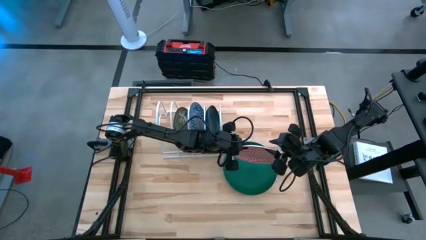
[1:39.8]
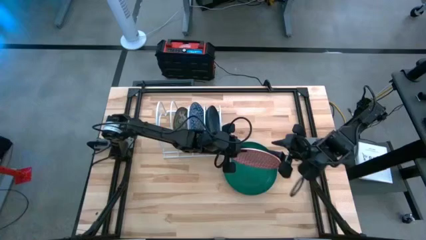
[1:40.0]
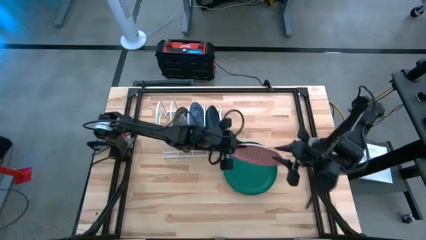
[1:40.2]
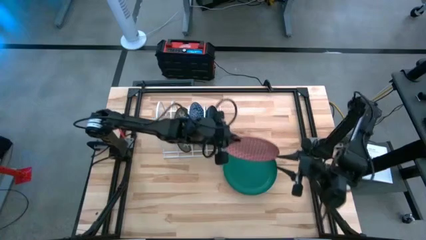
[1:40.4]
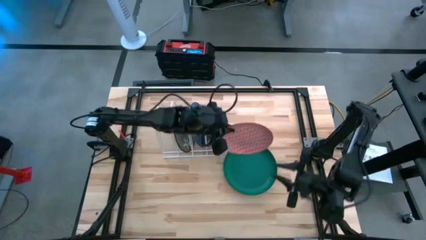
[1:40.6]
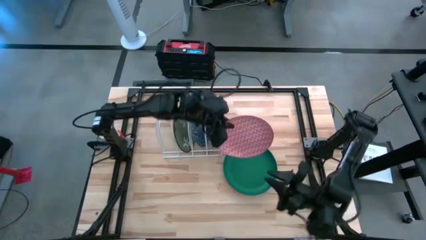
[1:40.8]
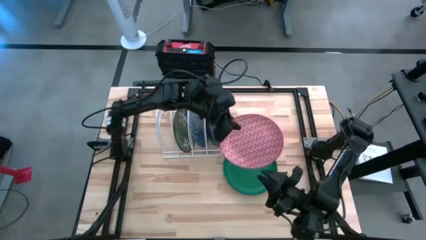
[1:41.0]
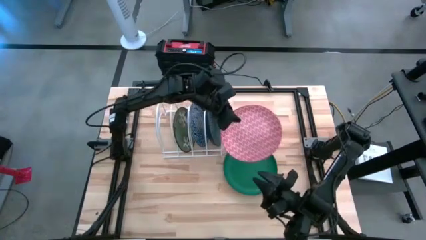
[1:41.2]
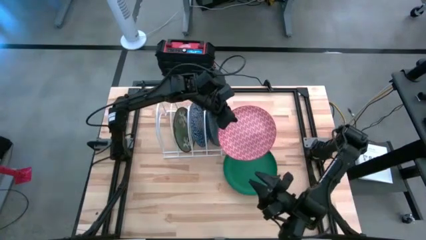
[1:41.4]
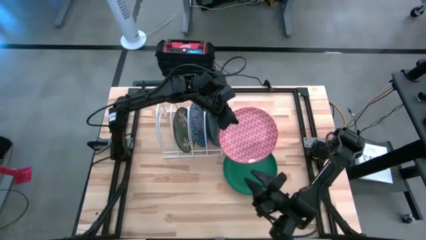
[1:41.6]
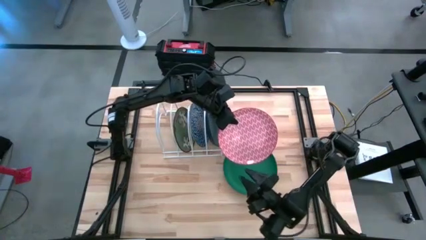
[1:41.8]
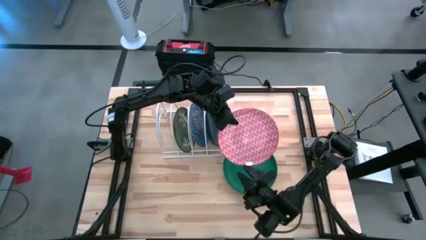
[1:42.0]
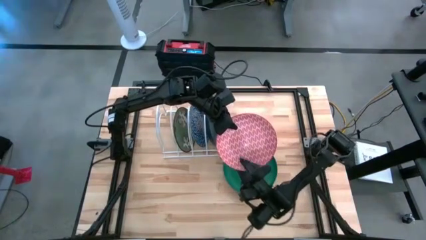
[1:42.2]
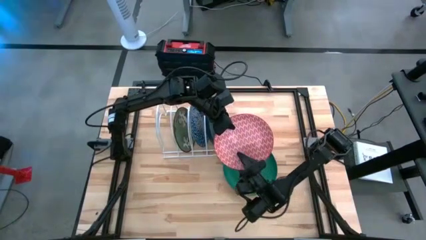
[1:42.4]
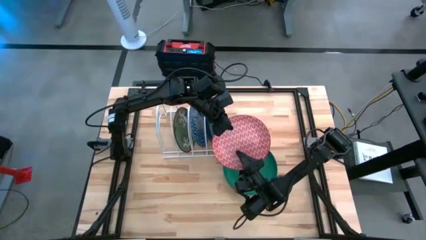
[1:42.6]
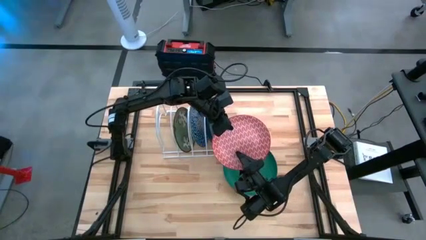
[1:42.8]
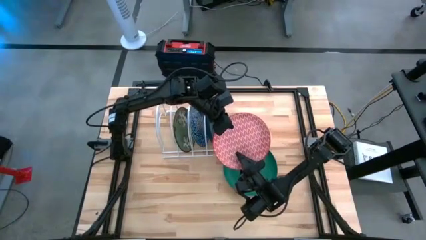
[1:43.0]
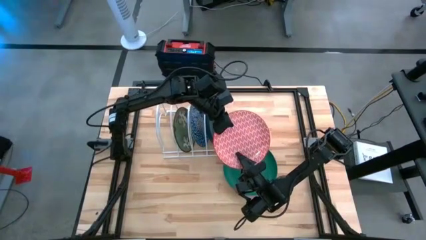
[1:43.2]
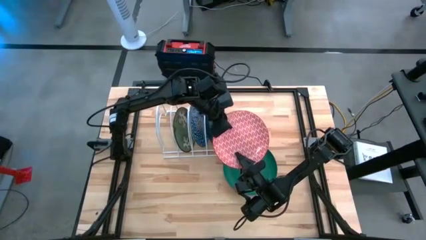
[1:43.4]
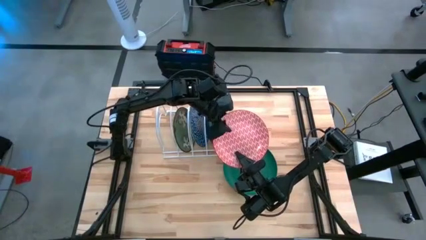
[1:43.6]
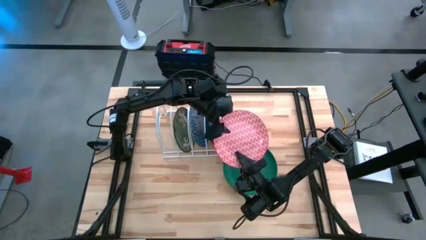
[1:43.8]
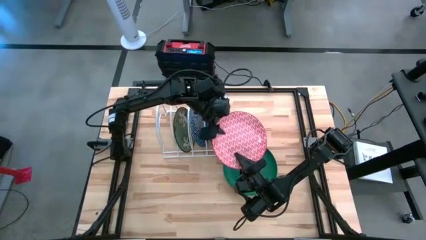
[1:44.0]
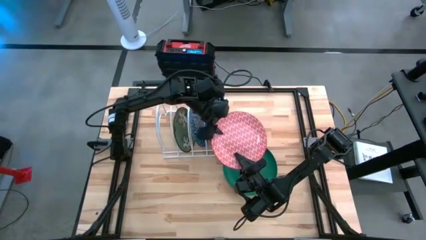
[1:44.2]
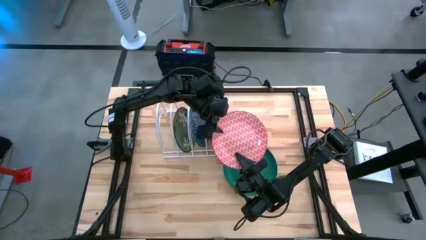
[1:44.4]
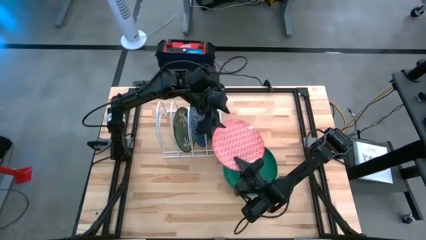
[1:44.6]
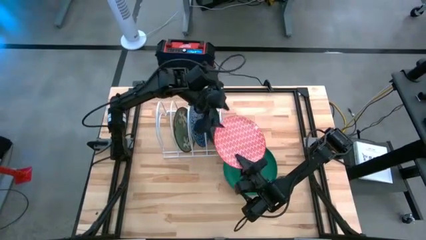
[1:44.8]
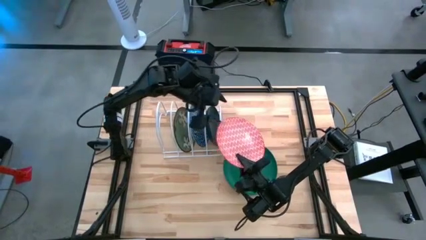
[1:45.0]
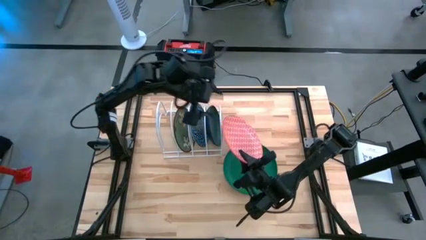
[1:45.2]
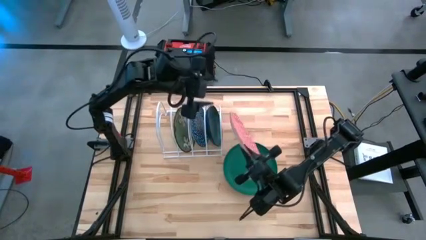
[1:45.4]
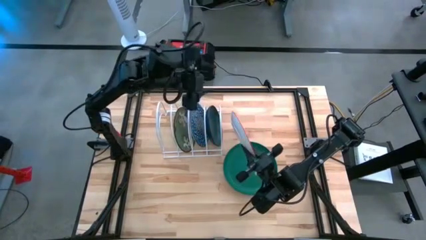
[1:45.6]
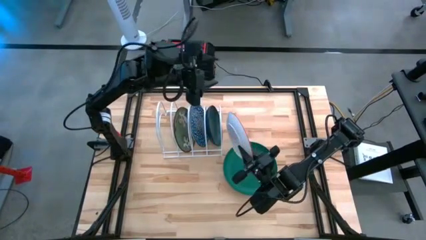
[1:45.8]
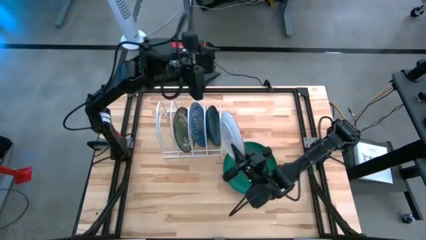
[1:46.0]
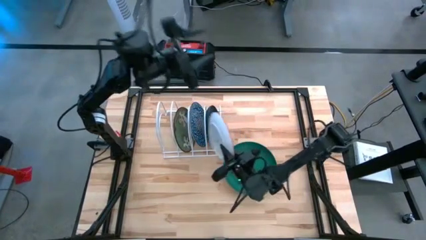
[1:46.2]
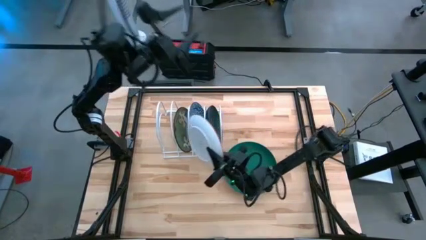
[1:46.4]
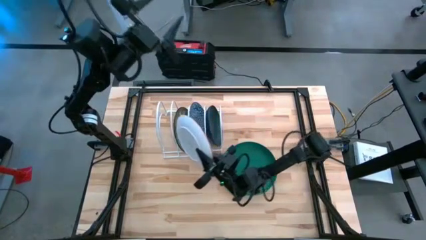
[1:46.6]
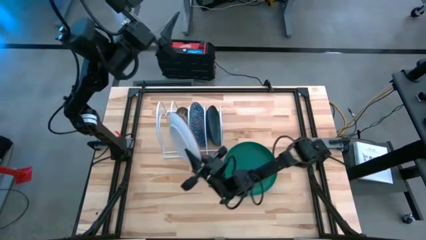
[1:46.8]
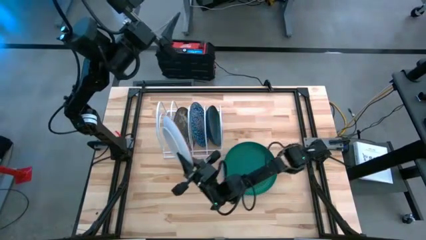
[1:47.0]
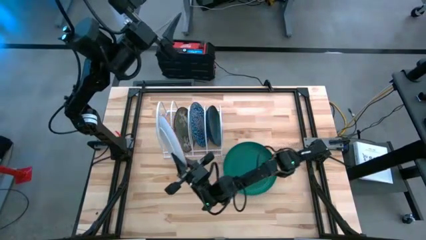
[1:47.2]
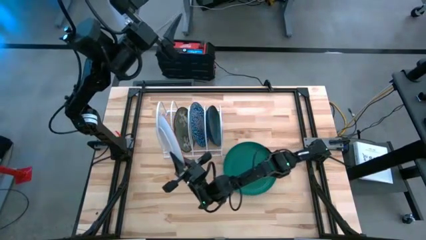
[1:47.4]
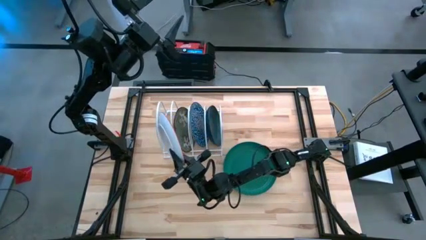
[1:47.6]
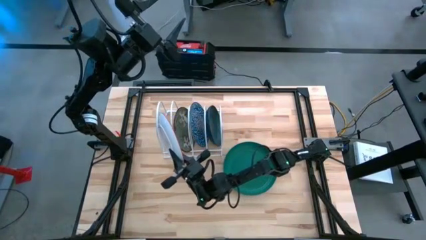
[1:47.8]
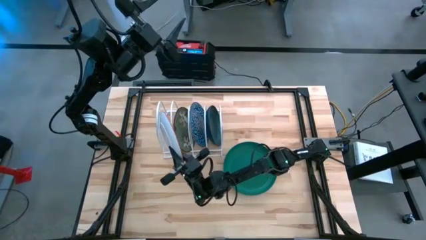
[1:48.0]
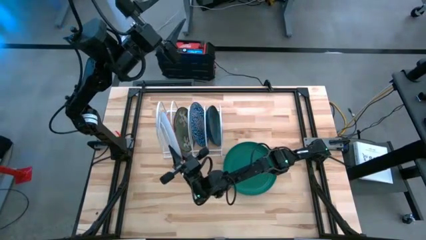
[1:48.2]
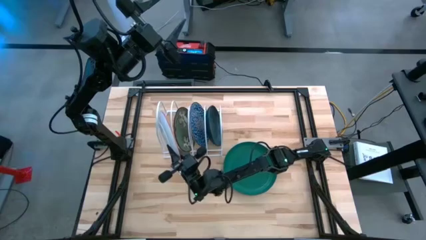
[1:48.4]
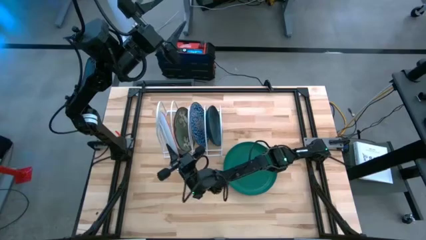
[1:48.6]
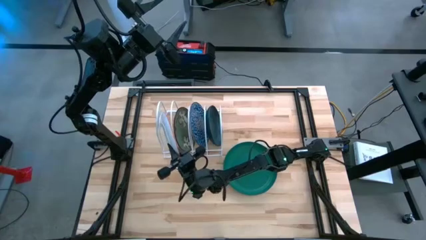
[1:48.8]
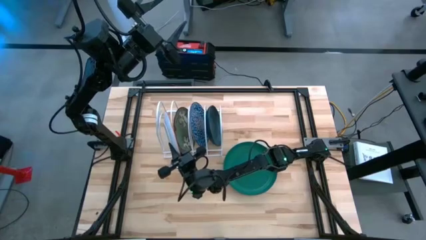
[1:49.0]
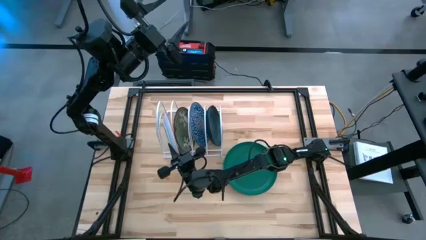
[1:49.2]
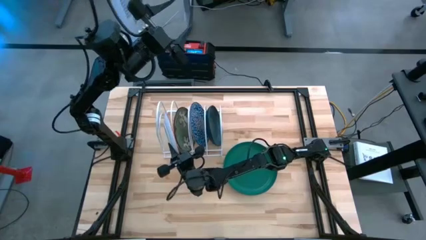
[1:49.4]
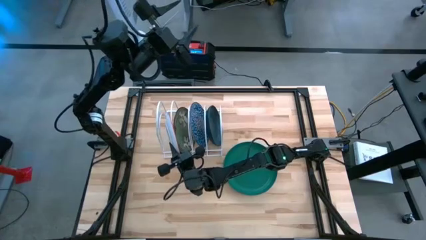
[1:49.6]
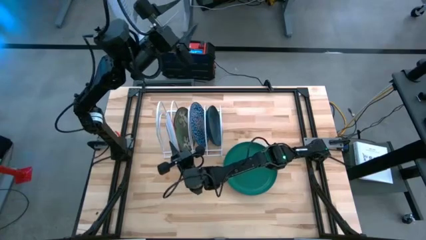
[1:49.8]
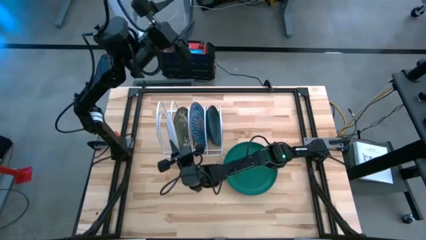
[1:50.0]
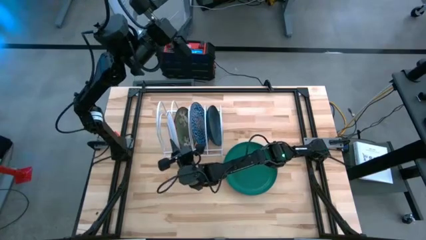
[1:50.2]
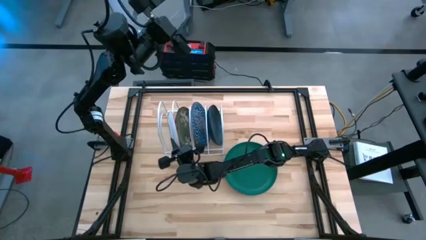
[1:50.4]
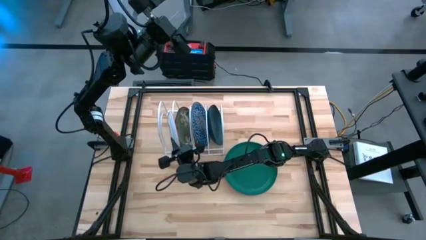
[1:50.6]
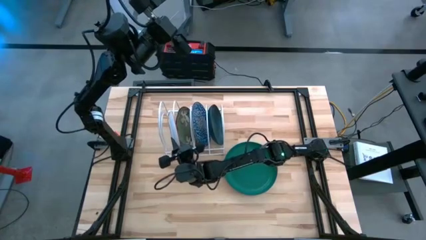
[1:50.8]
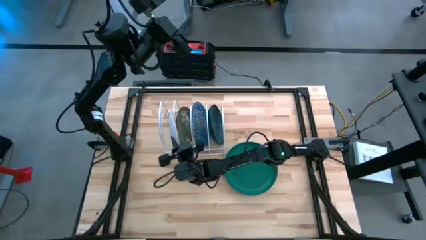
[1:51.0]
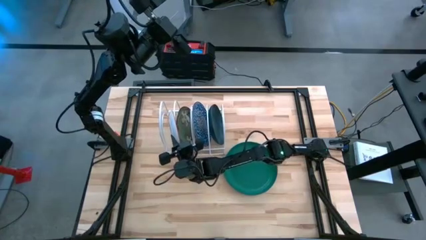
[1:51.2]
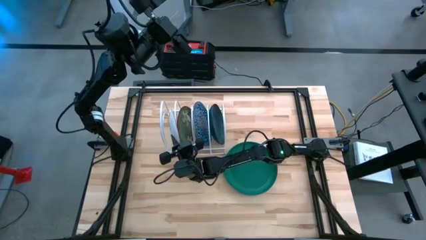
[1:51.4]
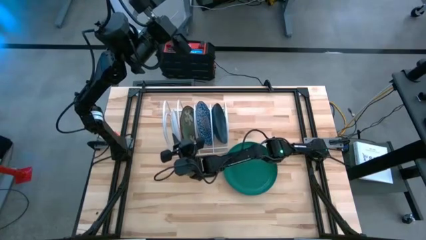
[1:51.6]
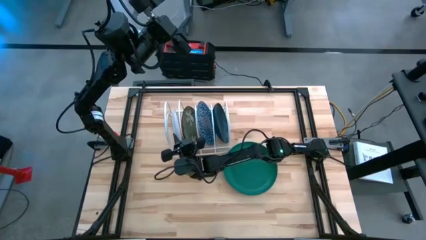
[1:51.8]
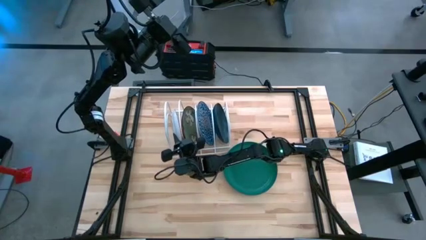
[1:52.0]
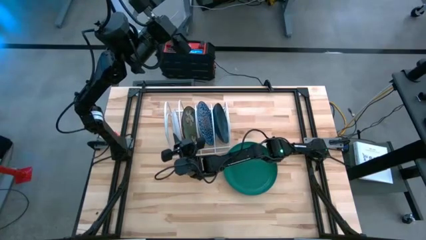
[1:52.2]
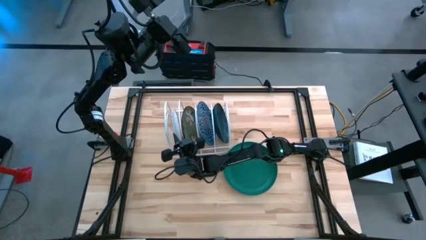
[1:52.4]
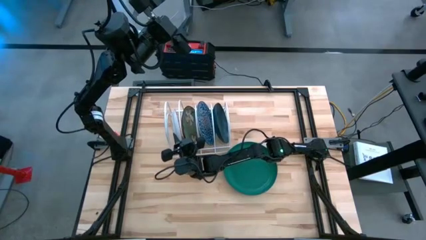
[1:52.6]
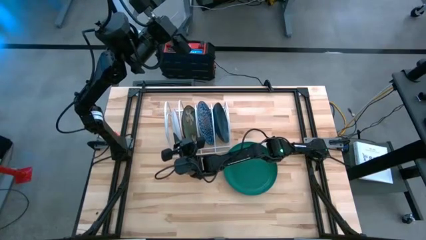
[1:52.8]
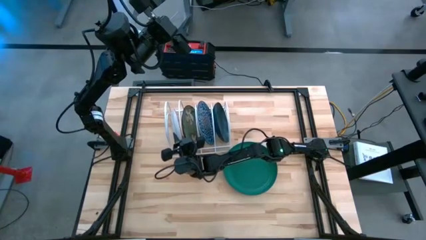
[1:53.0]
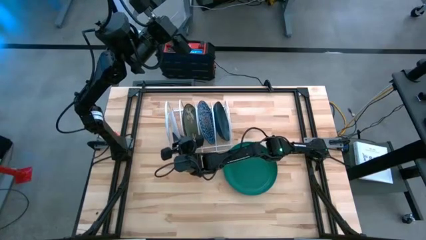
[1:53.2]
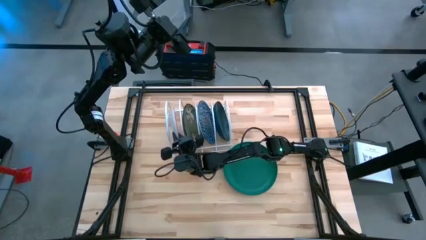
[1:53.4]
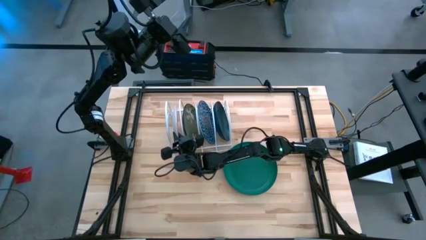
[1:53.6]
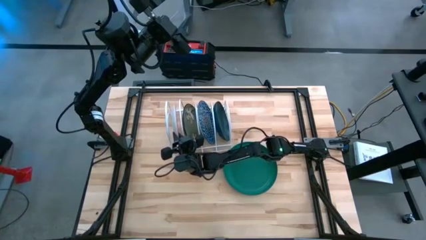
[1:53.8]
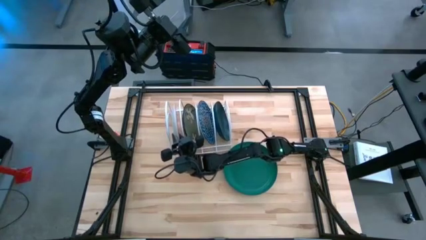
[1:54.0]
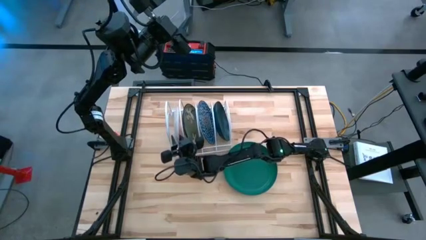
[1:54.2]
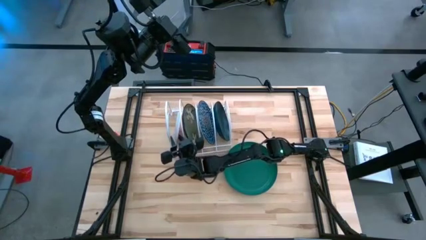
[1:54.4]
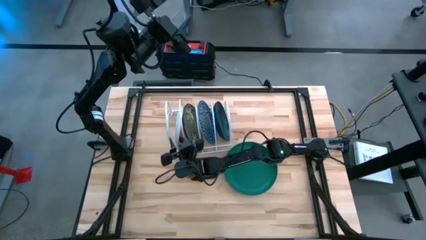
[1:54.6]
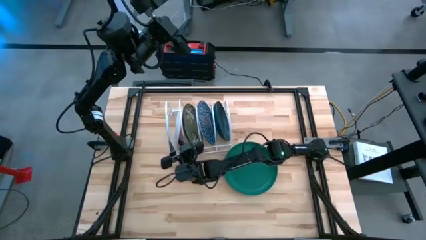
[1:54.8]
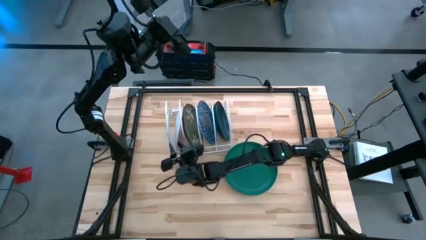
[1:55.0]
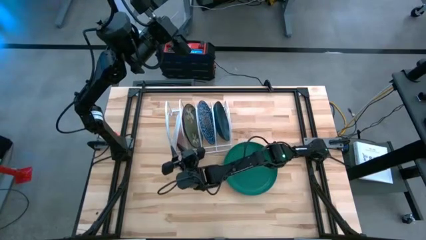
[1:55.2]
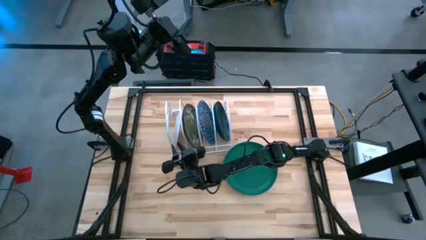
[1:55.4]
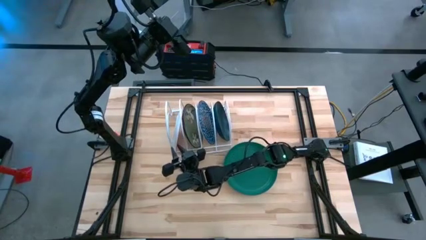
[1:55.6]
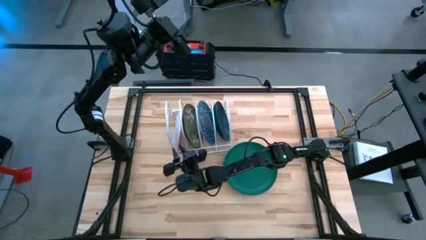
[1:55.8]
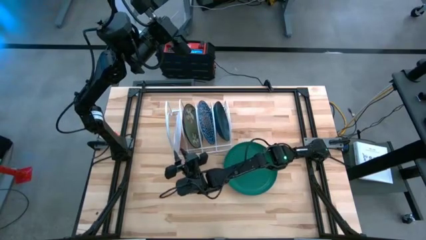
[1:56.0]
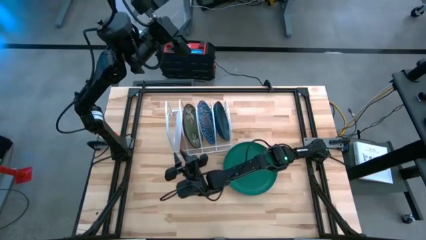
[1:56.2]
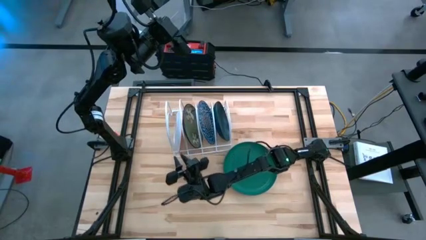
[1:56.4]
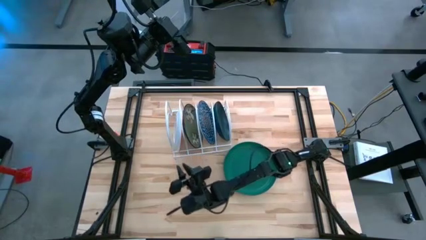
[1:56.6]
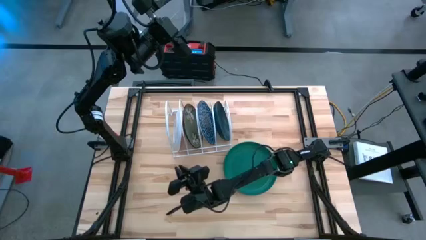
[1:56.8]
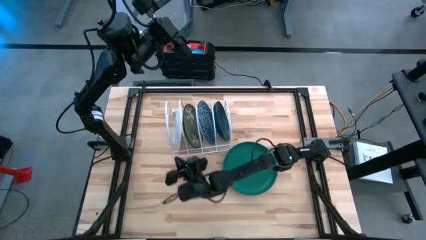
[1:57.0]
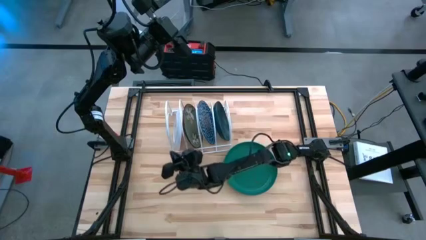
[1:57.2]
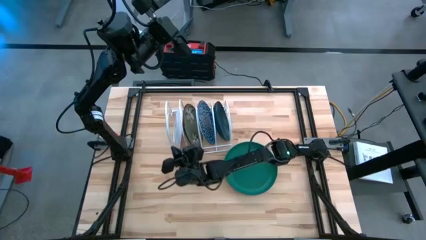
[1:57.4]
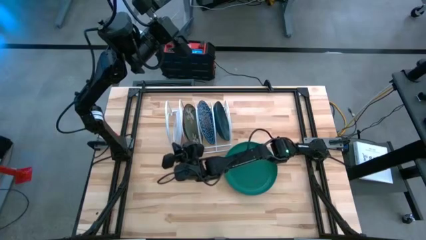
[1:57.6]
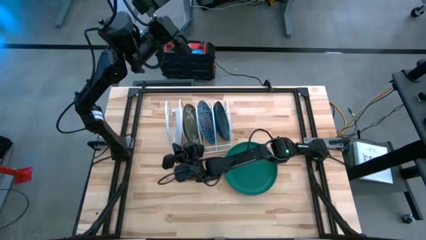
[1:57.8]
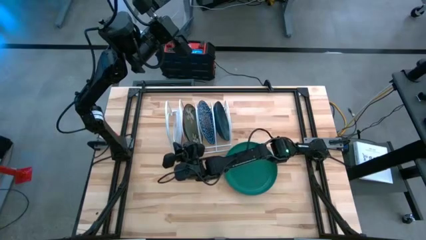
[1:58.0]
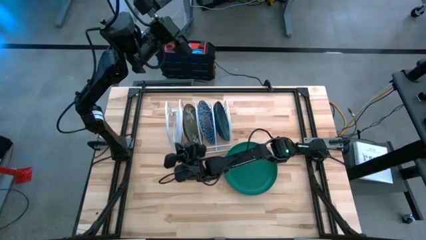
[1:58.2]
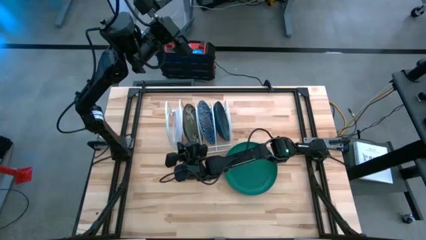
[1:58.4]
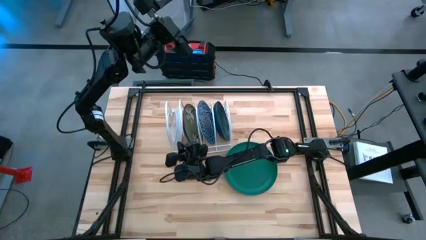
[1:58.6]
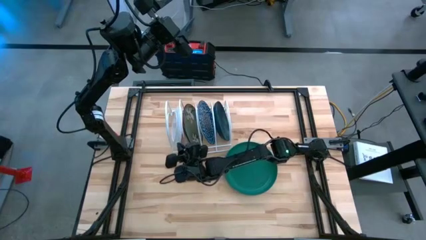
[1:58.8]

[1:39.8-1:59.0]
Task: Sort dishes
Put the orange patterned plate into the dish rack
